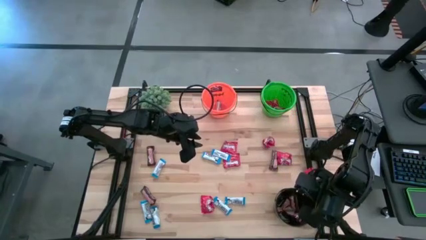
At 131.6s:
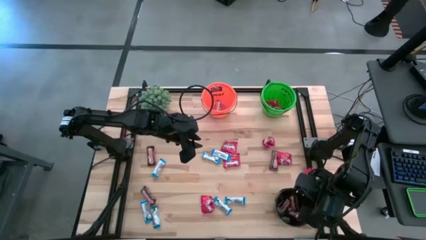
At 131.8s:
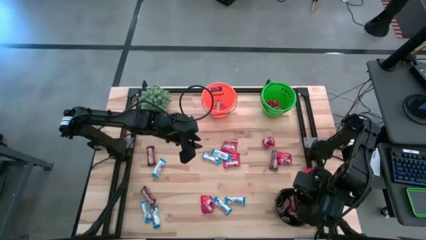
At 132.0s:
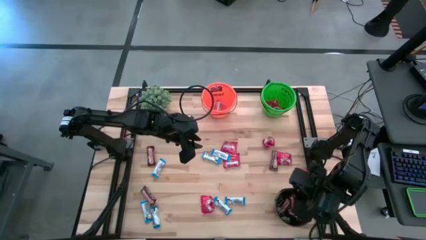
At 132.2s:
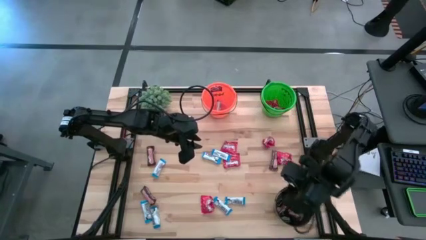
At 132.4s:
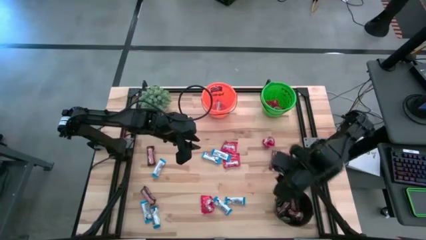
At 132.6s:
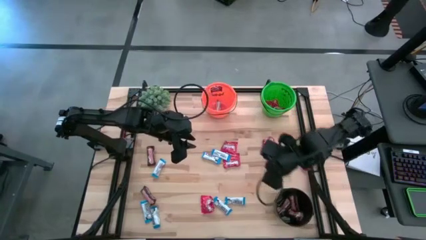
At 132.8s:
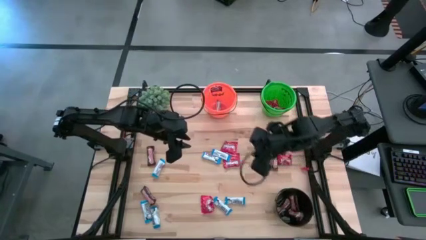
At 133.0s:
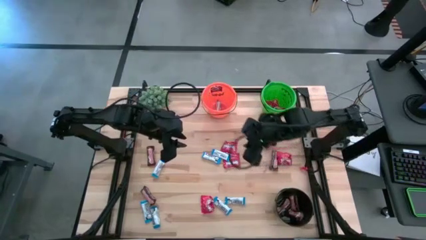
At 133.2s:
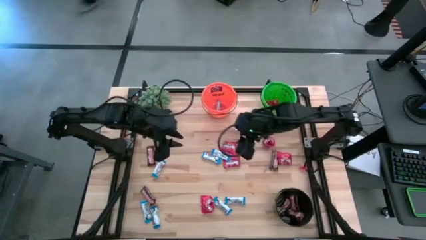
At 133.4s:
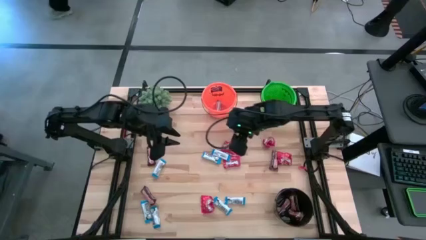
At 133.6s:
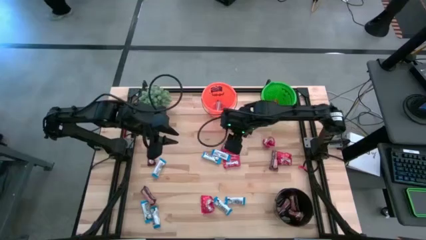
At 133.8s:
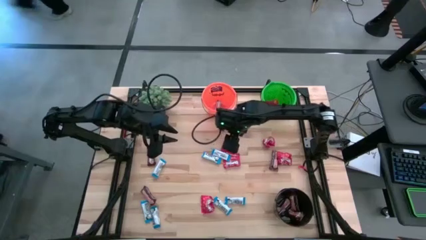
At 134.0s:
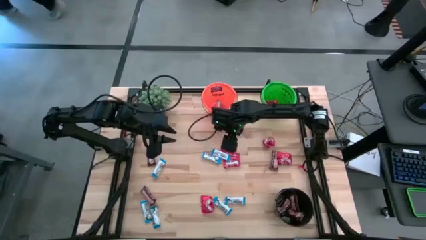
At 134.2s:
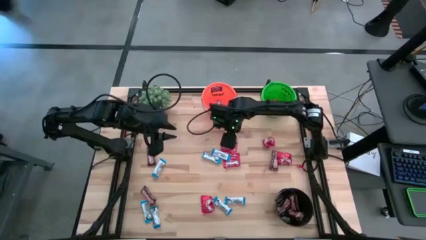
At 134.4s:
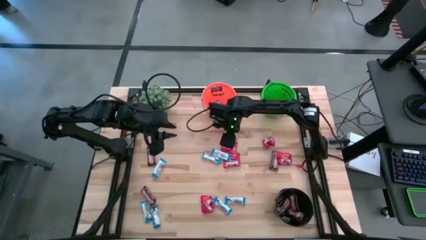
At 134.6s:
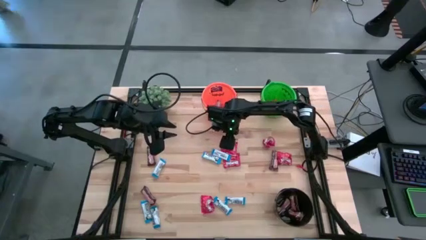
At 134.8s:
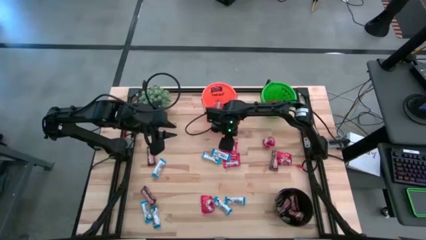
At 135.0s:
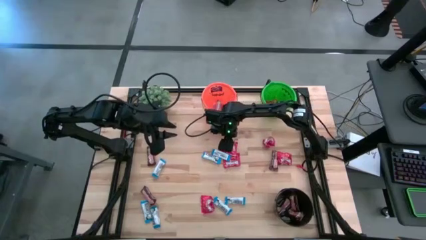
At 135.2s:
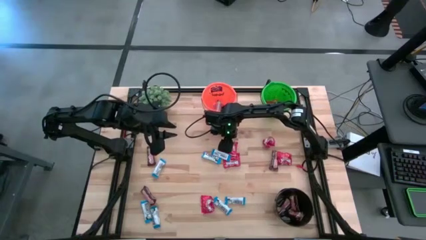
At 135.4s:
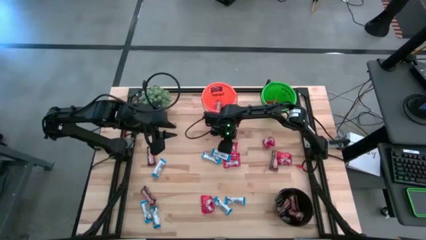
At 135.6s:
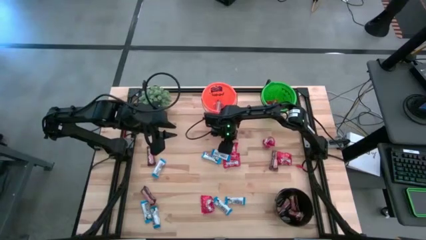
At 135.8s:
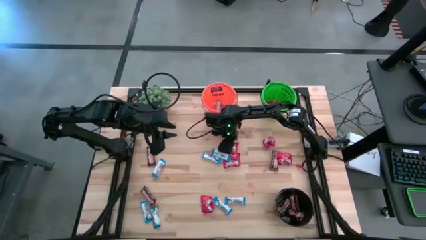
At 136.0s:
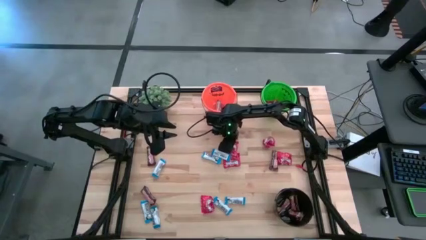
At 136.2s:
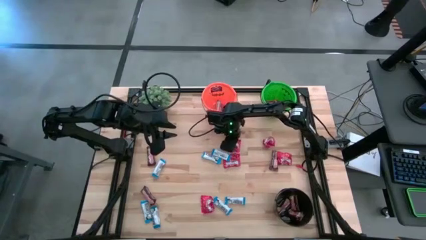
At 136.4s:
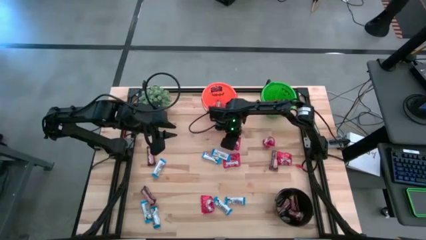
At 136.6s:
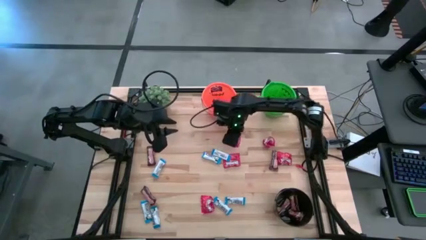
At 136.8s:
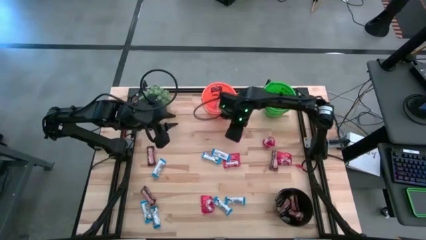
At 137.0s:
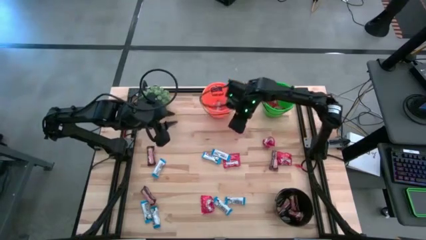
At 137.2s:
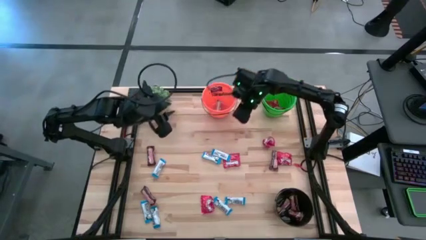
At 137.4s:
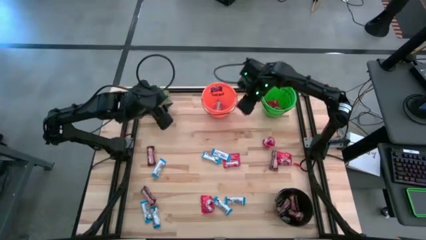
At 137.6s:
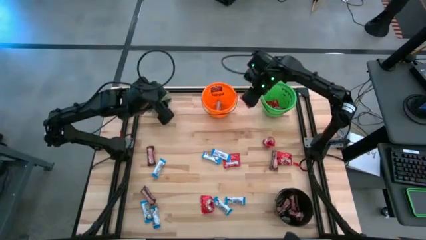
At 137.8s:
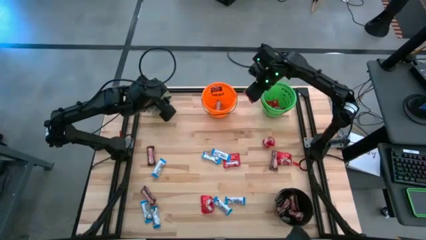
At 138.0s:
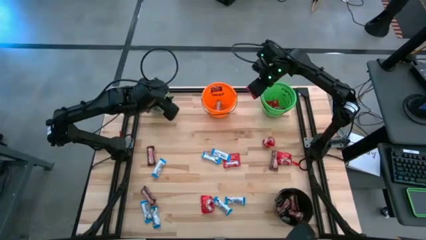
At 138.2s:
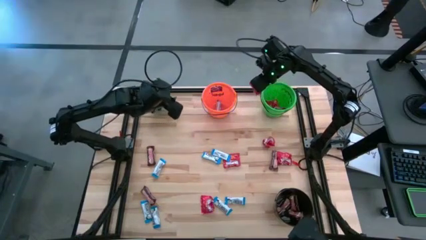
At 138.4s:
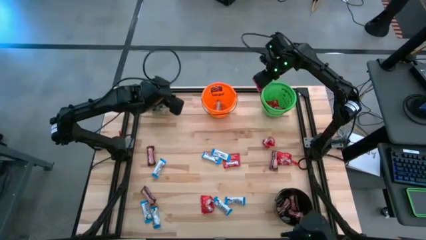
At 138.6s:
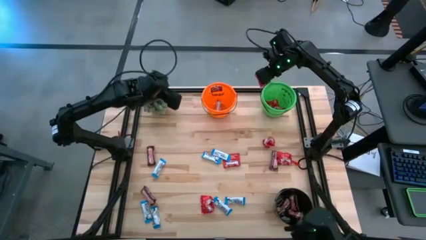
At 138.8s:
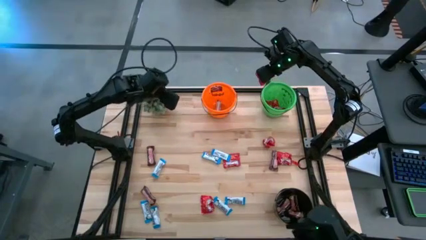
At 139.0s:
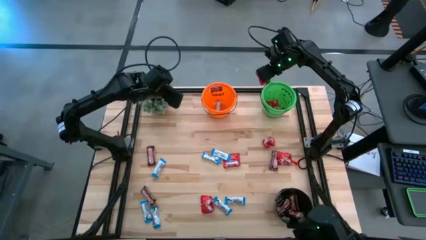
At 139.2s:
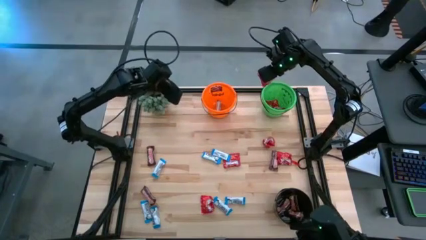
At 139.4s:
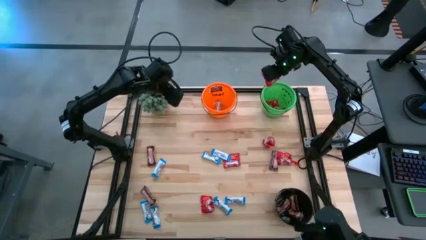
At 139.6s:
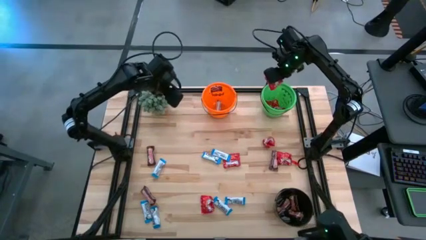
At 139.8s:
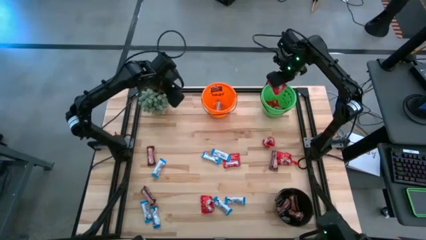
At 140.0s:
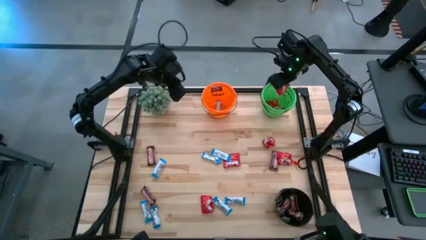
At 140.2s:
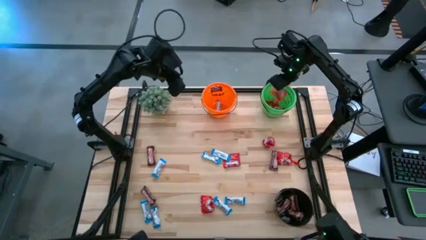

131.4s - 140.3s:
Task: Organize candy in baskets
Put the red candy into the green bucket

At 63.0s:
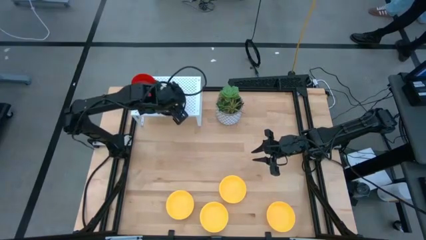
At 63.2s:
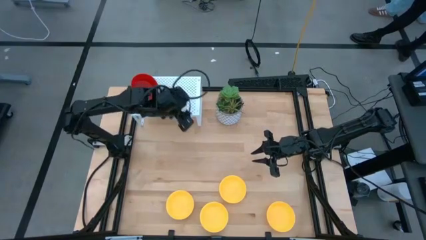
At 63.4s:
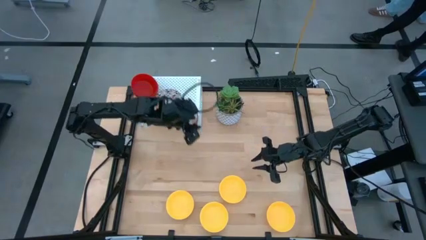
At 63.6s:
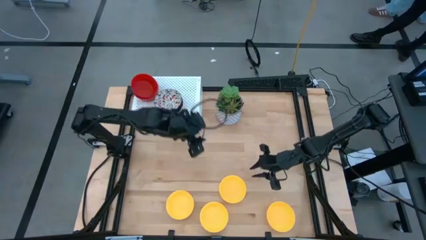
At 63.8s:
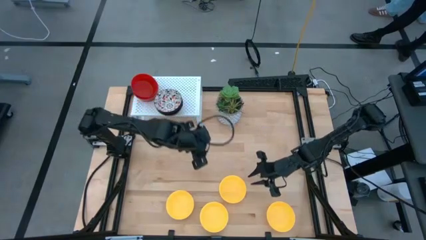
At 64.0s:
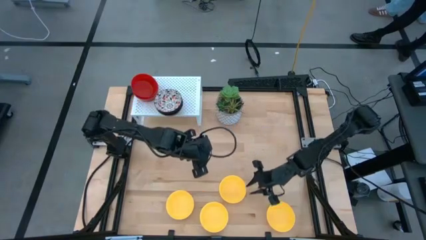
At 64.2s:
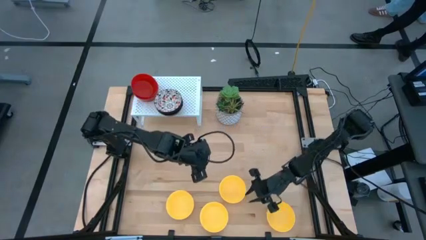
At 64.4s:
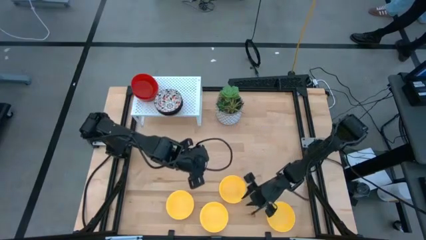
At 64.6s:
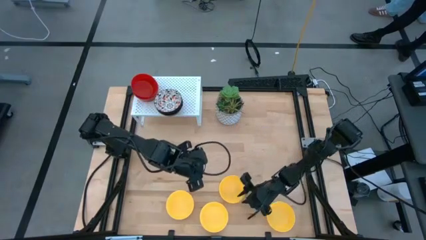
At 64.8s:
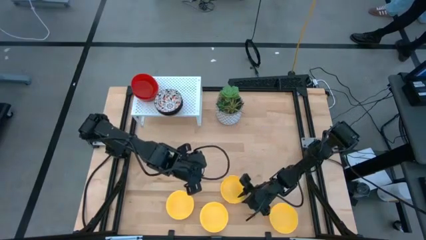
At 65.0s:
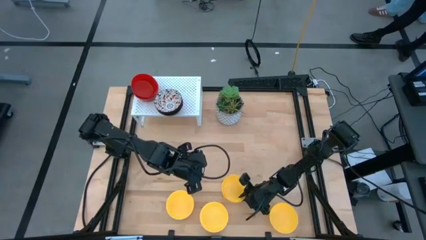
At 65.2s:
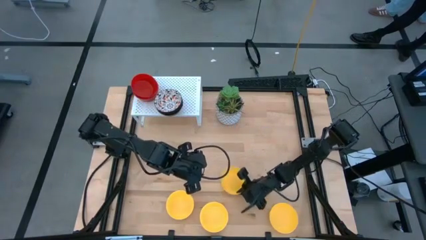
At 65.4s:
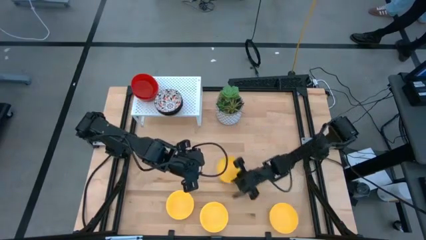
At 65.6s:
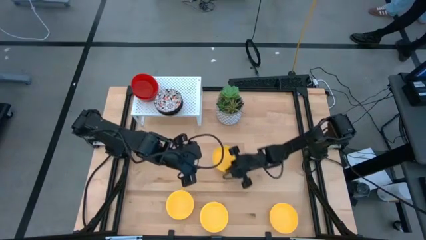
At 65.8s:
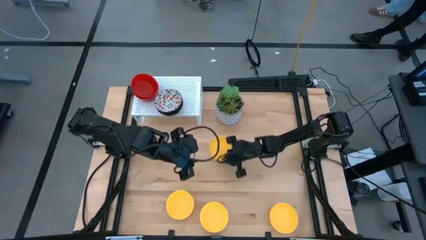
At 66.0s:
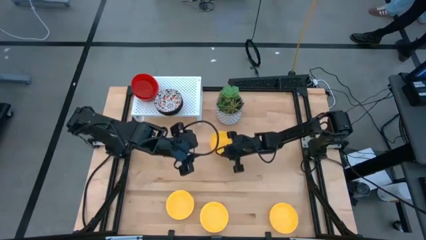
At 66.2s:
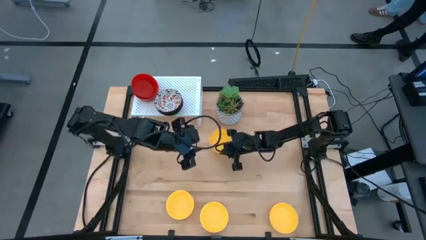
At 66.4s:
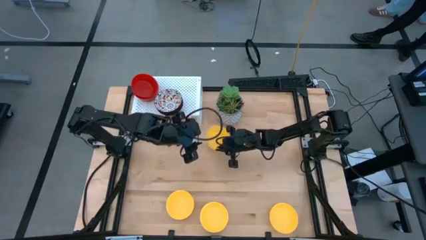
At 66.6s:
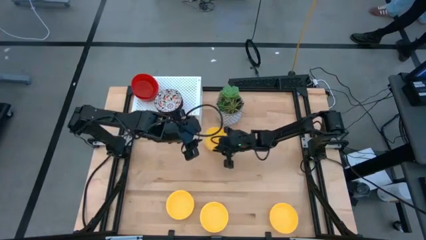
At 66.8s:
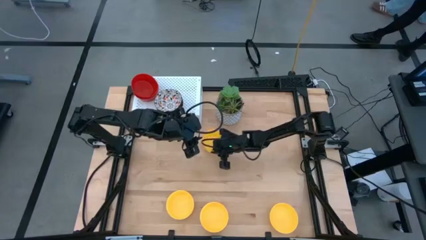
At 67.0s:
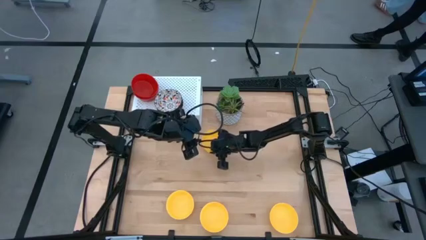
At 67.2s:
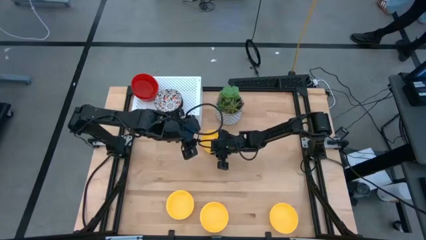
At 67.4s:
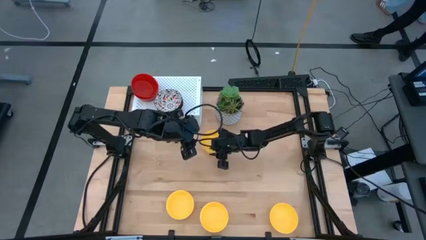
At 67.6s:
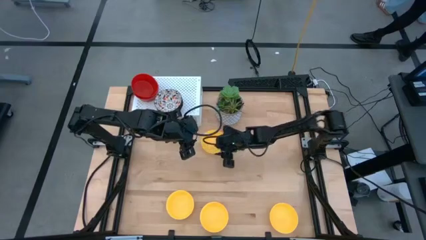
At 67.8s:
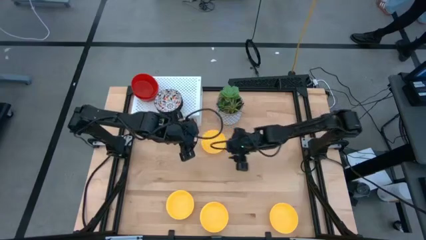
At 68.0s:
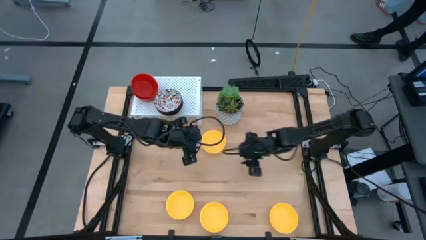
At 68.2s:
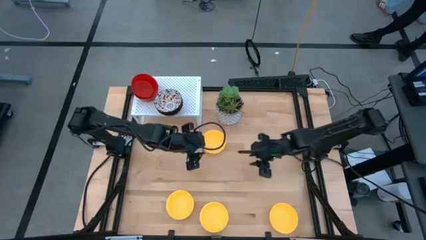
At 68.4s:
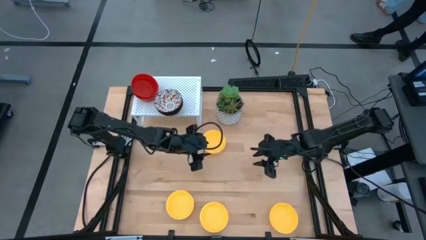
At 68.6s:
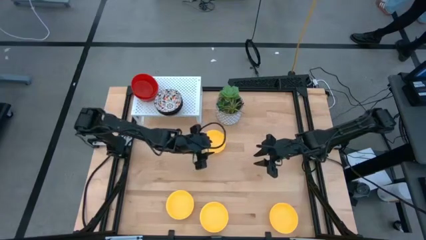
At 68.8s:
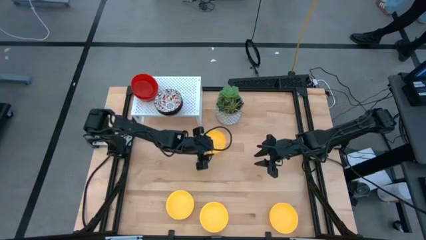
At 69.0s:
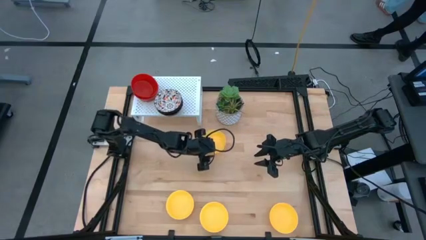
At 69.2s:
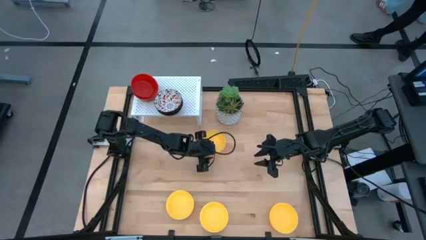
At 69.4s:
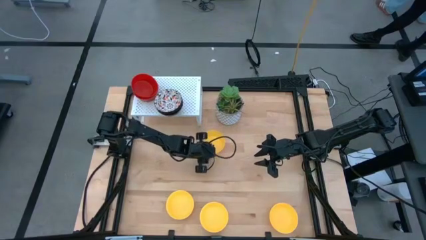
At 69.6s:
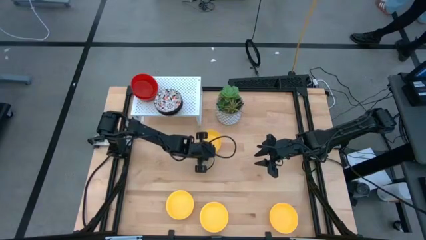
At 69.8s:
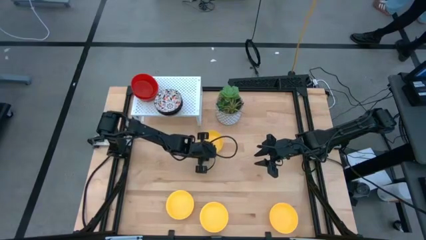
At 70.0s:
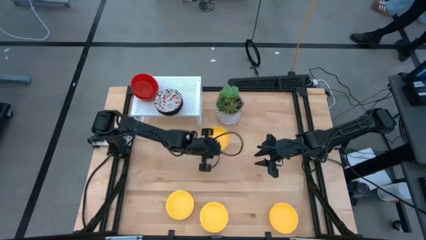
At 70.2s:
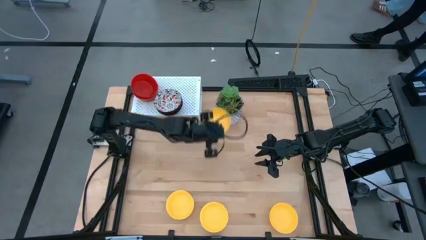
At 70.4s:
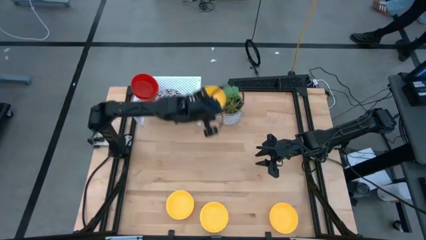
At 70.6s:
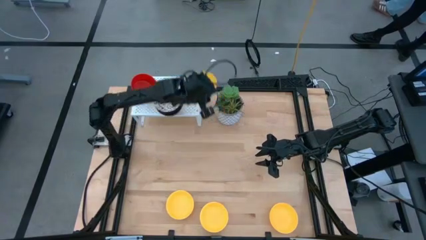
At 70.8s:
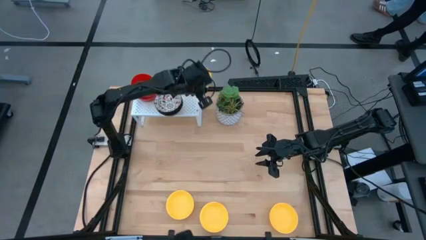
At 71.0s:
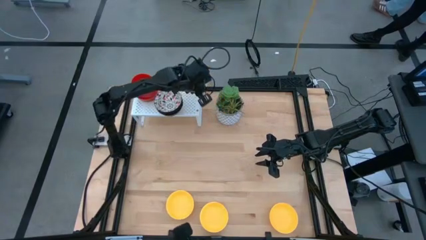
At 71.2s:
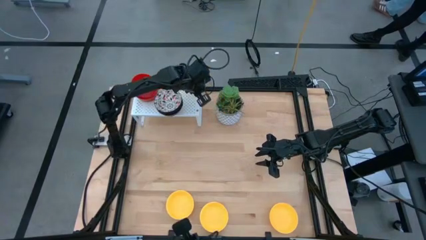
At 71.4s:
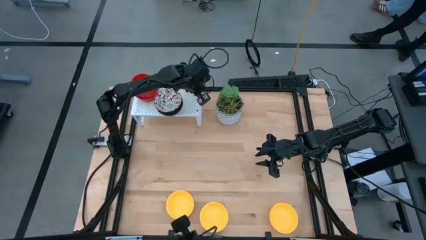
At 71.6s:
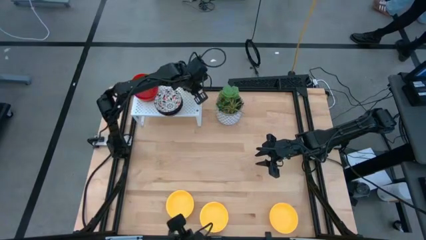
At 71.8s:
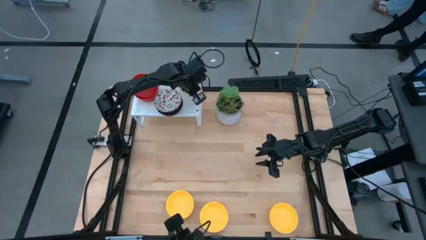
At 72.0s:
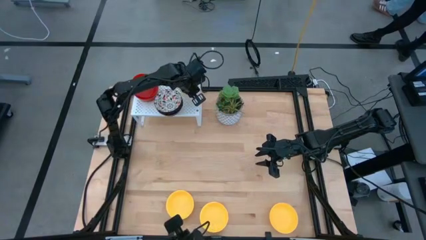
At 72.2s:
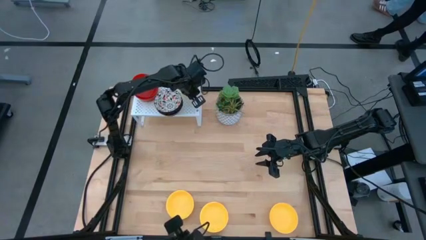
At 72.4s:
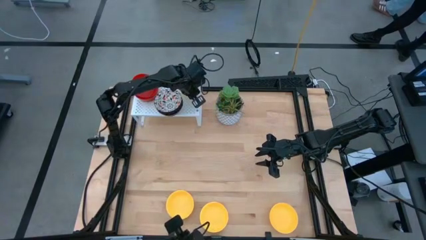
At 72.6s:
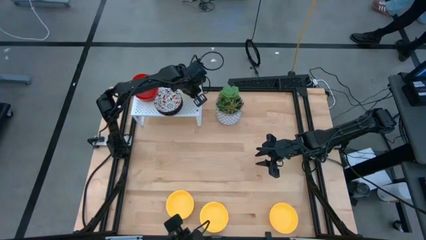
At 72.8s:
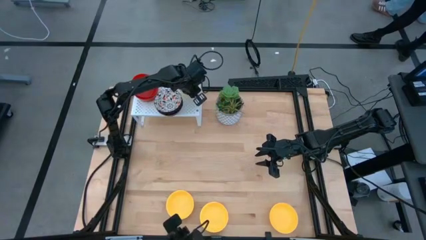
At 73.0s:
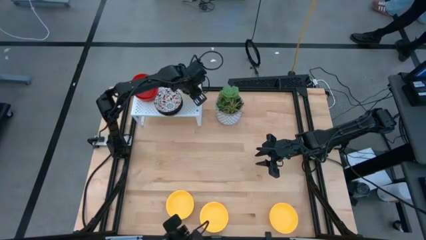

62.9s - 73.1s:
Task: Pick & Place Mini bowls
Put the yellow bowl on the shelf
